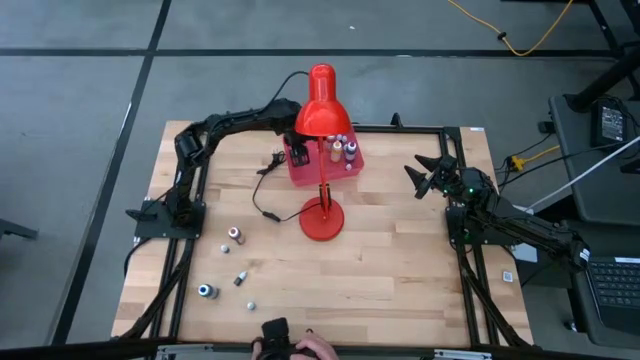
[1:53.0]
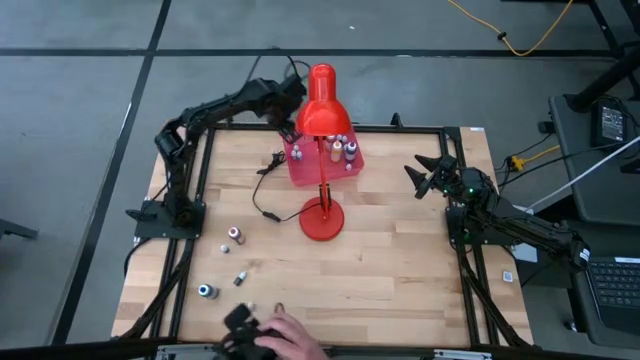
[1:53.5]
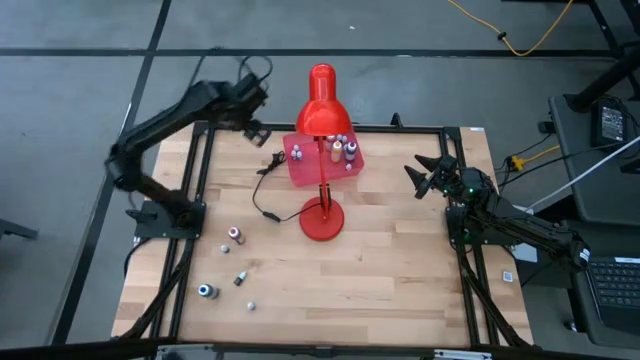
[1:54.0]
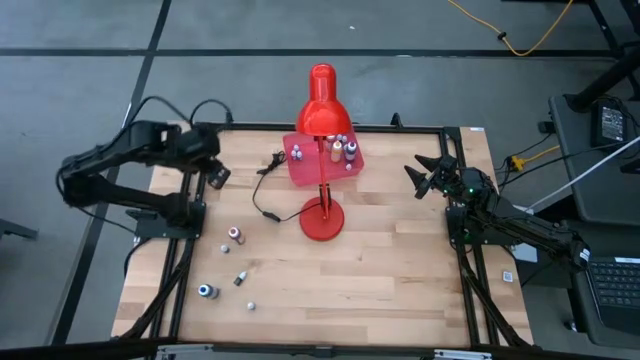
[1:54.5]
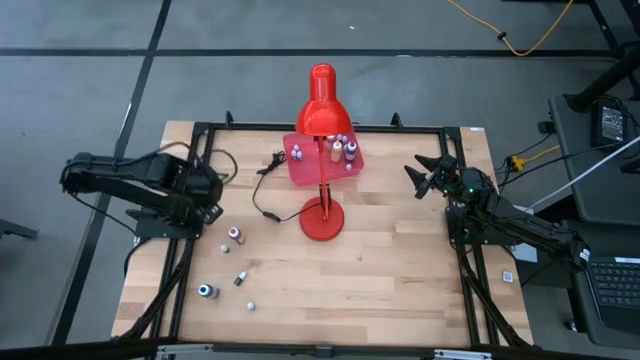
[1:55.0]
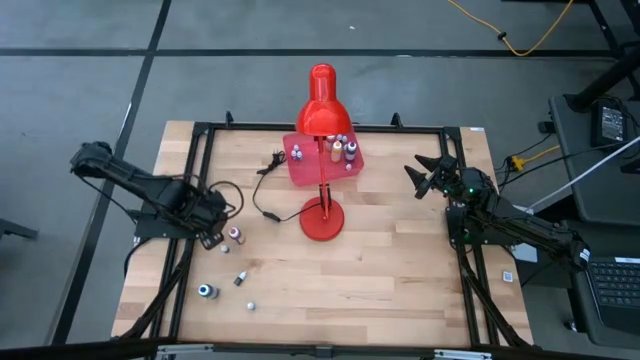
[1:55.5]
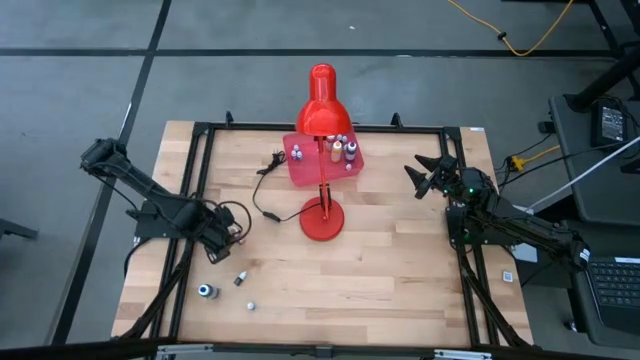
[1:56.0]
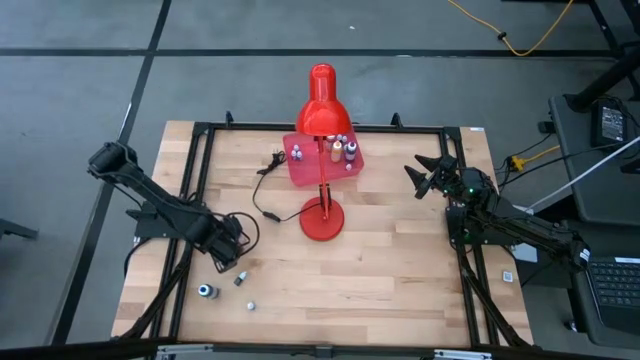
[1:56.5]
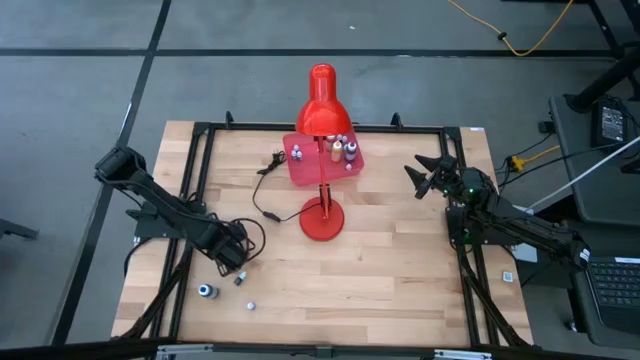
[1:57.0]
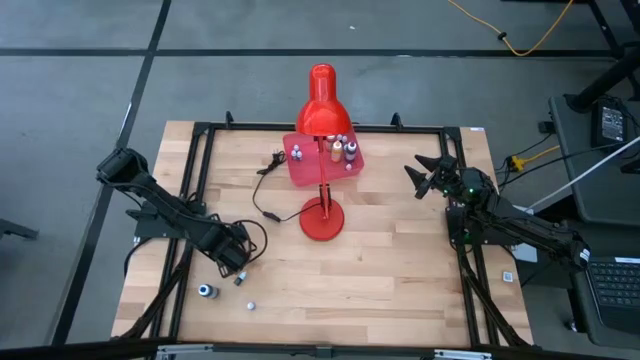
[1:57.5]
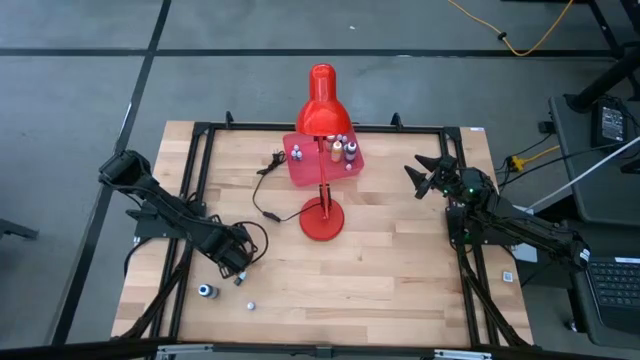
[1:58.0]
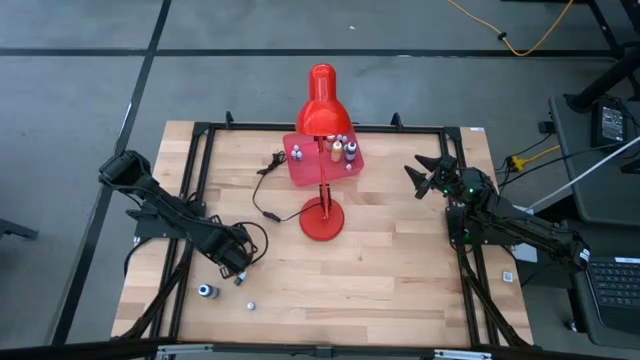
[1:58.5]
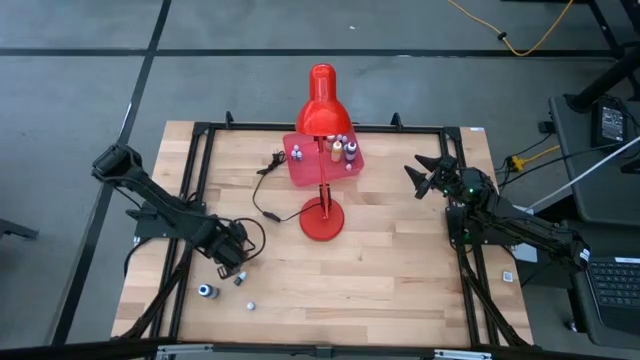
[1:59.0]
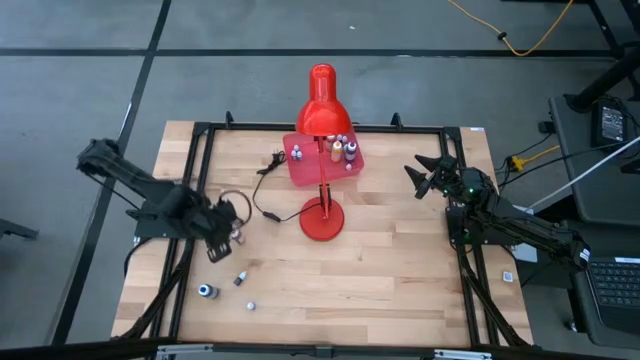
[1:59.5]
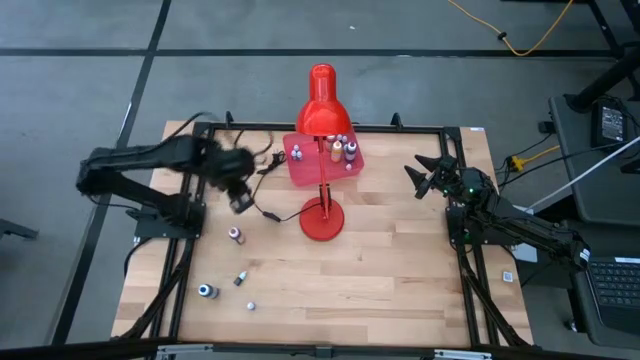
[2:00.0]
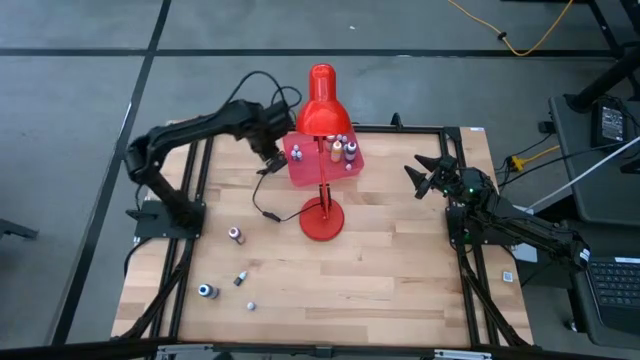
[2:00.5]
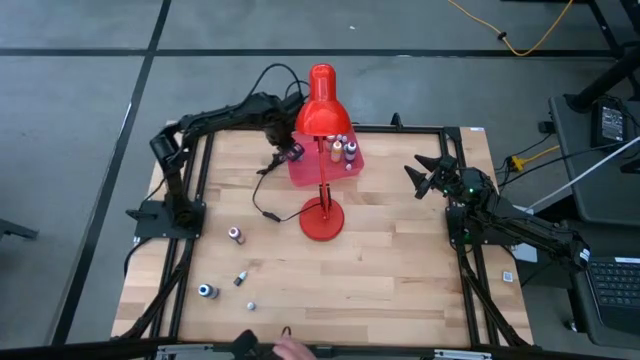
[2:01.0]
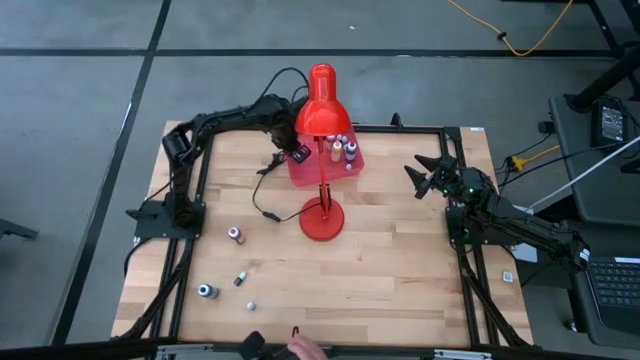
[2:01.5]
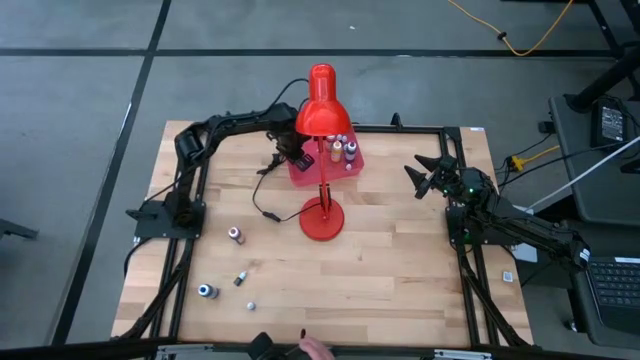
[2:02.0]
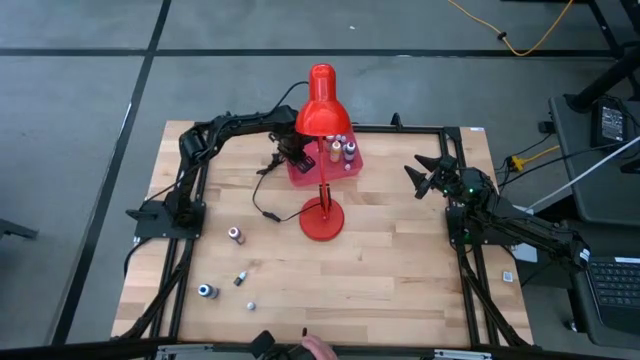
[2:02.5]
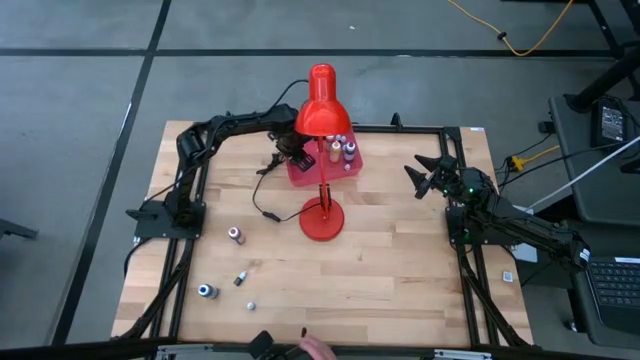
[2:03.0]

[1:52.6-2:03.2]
Task: Pick & Place food coloring
Put the small red food coloring bottle into the red bin

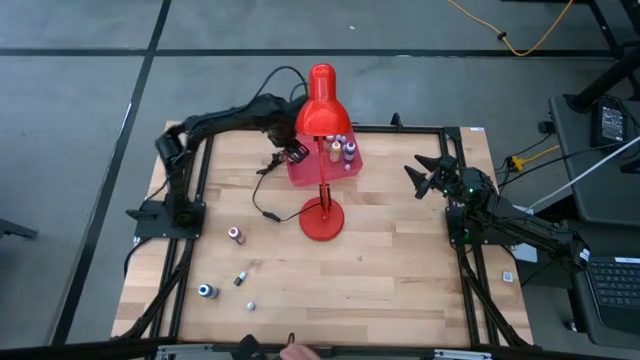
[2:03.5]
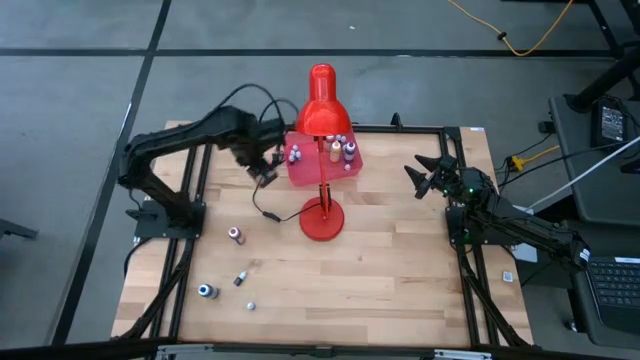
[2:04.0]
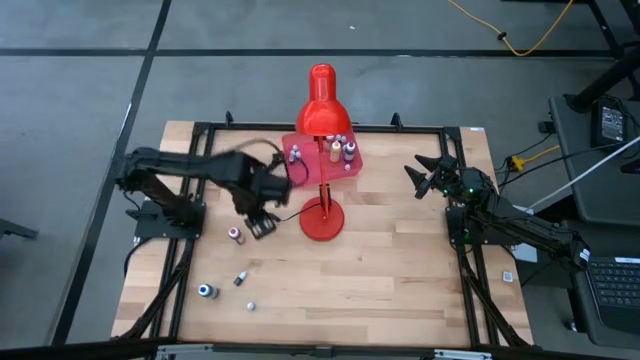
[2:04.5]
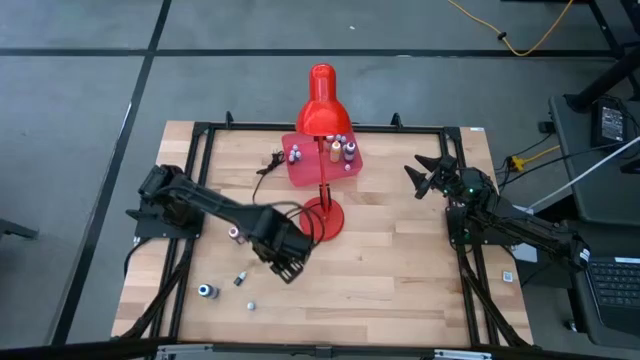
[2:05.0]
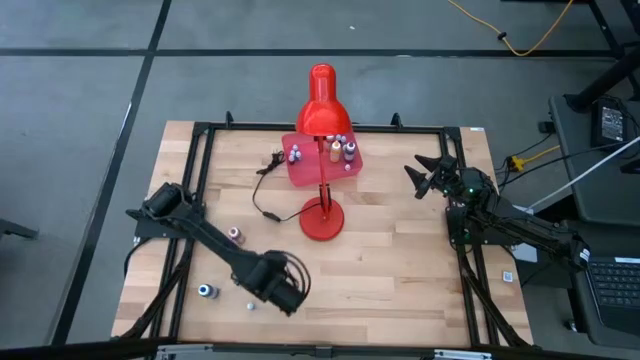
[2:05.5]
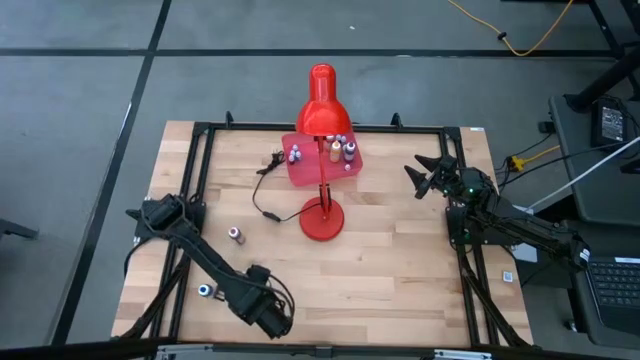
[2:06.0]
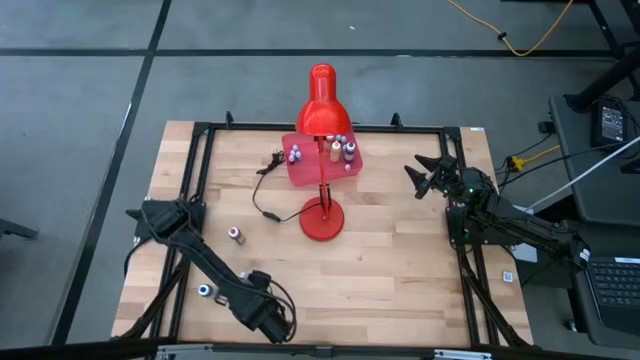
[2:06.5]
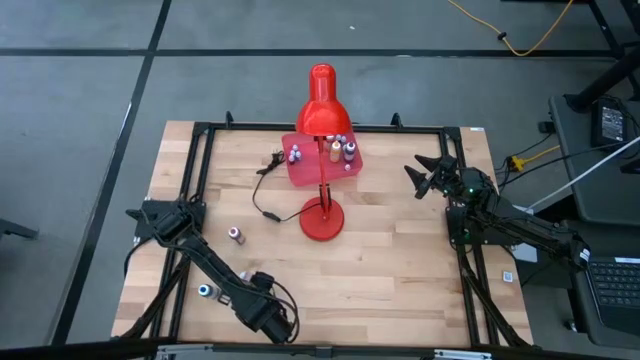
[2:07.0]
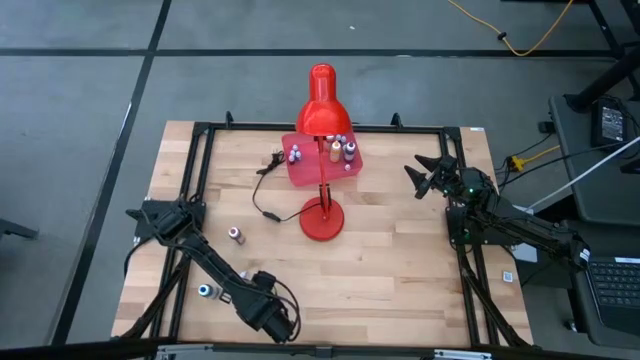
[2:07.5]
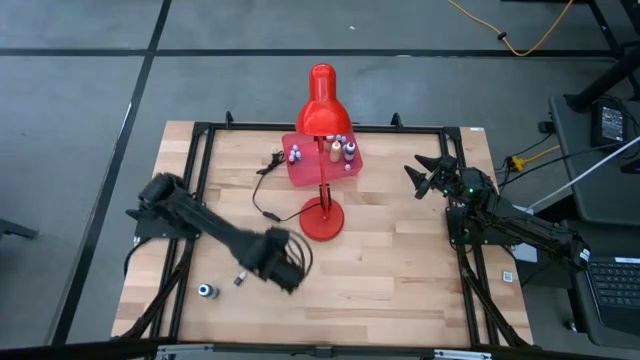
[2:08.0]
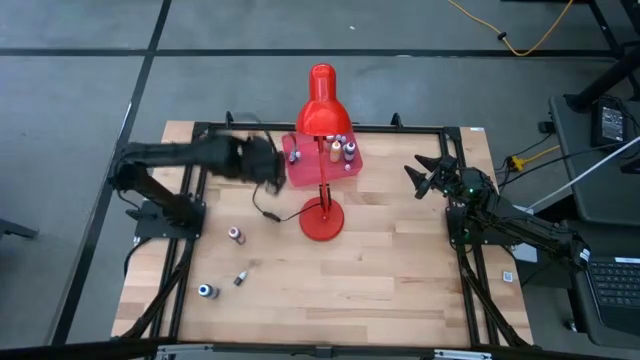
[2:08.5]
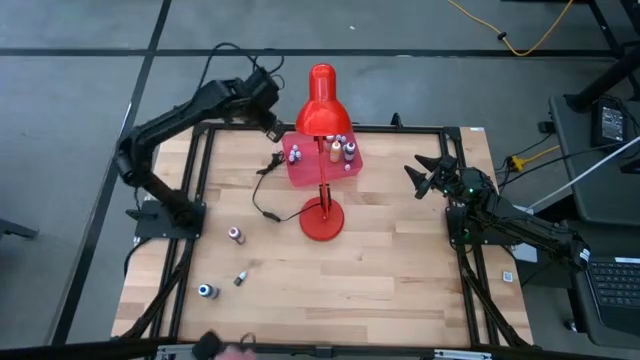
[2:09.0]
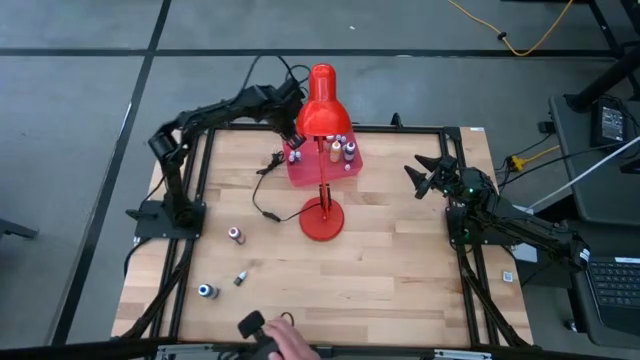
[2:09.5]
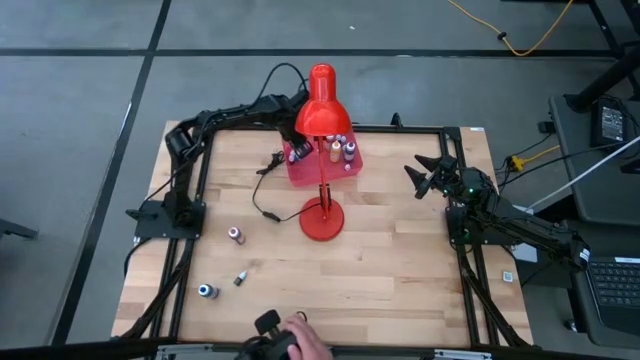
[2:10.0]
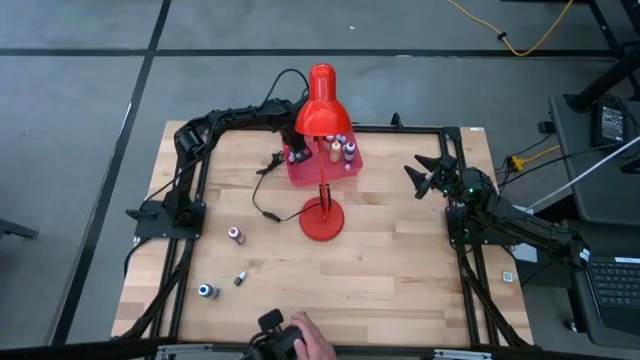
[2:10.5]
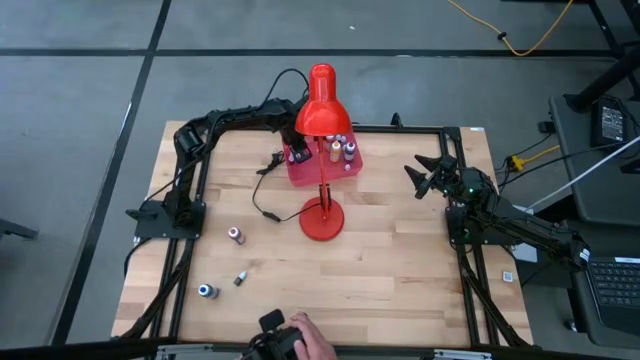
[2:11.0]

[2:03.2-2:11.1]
Put the small purple food coloring bottle into the red bin

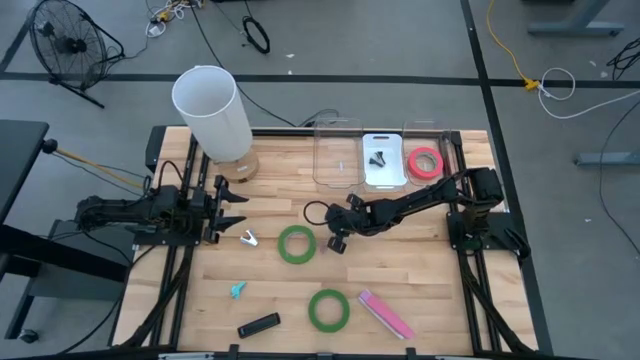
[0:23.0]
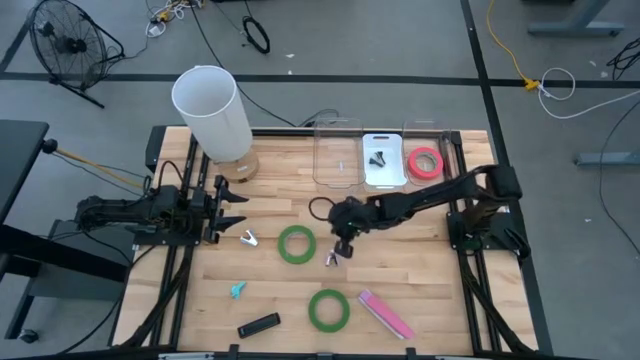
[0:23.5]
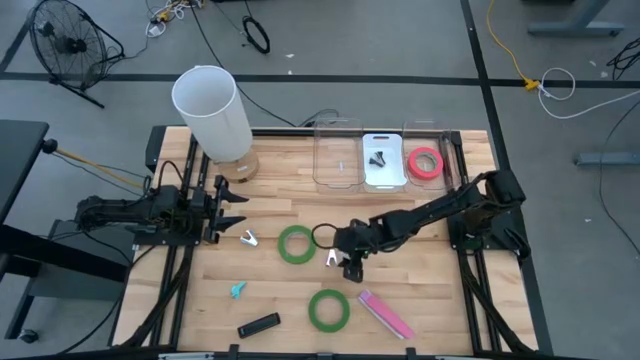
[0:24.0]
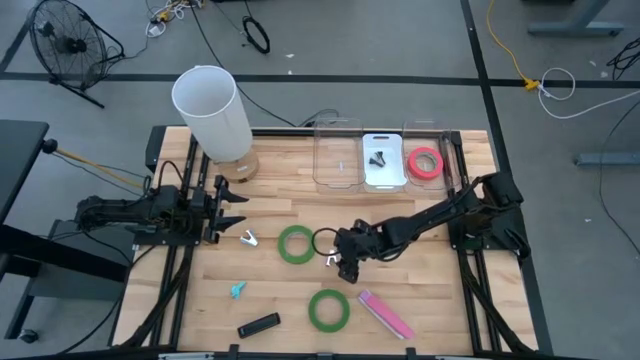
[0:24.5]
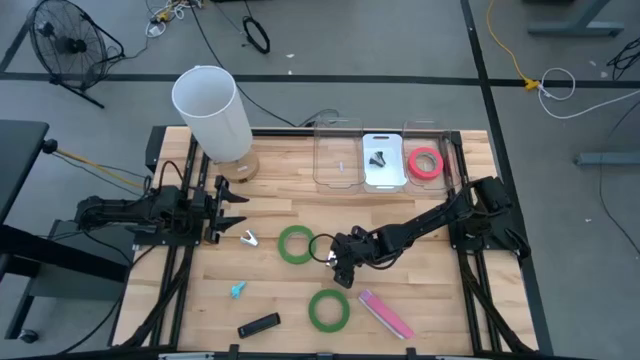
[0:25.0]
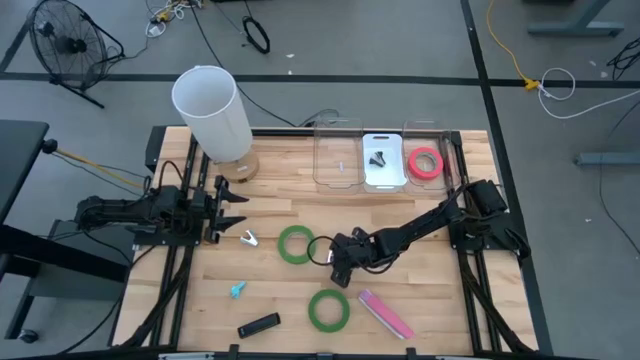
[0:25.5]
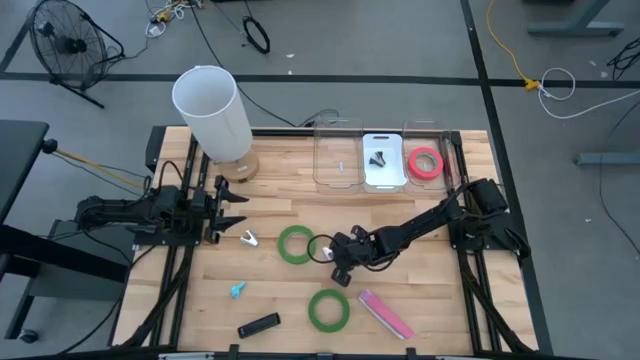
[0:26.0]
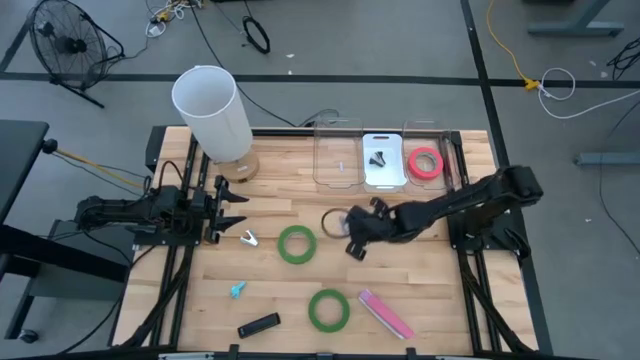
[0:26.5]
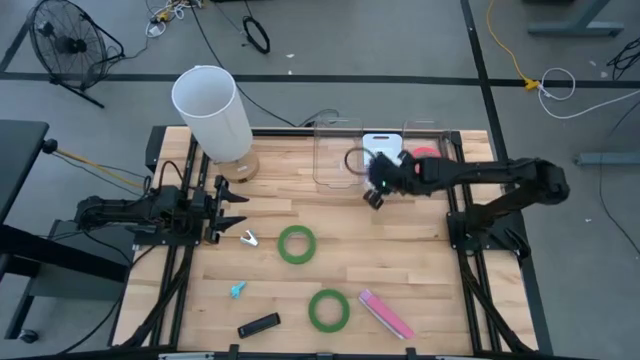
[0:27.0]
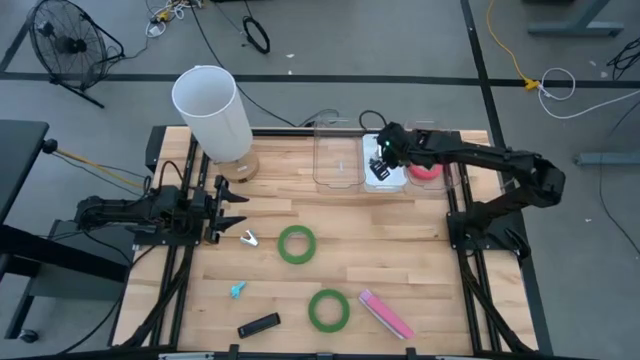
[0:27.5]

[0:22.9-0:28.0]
Task: Pick and place Stapler, Stapler remover, tape
Put the violet staple remover into the white bin
